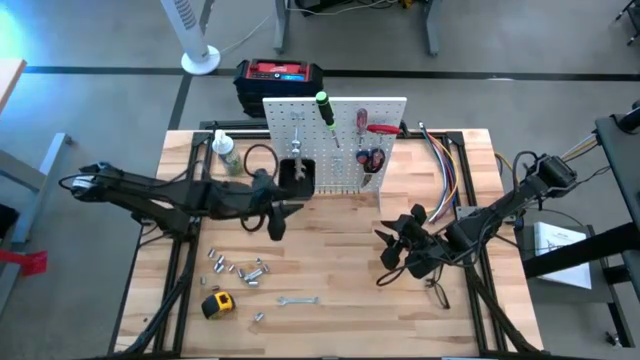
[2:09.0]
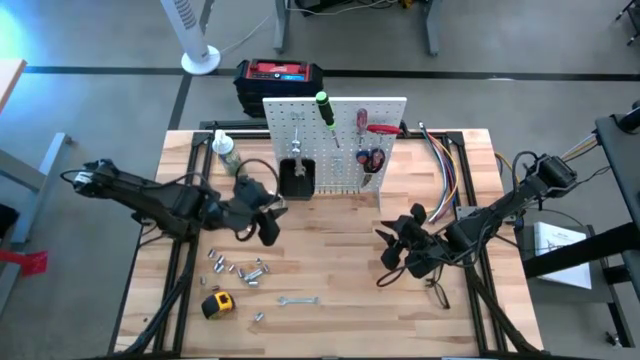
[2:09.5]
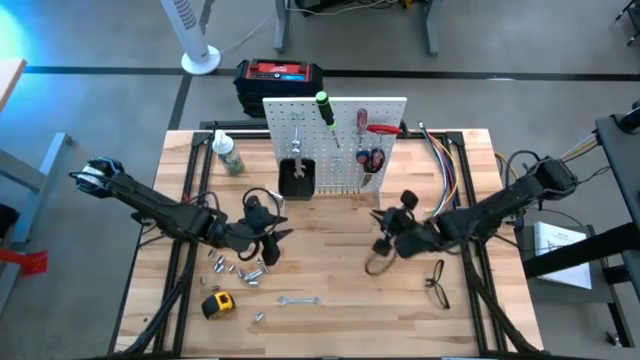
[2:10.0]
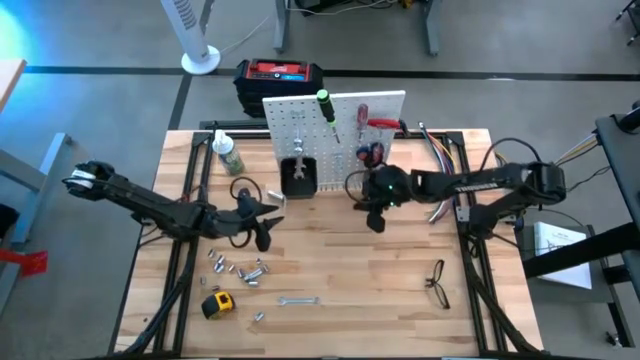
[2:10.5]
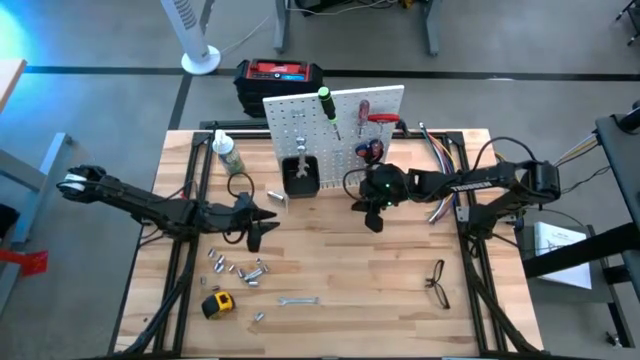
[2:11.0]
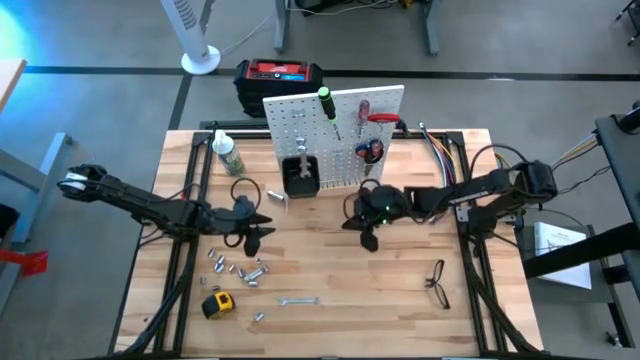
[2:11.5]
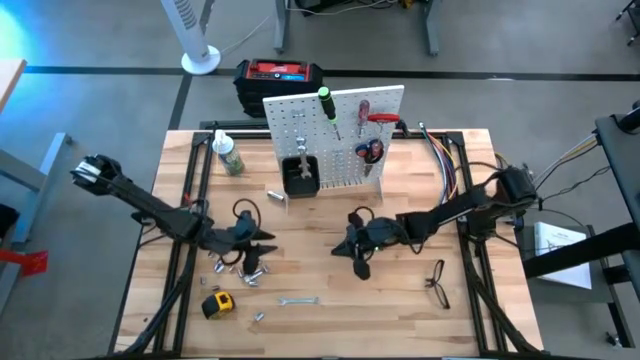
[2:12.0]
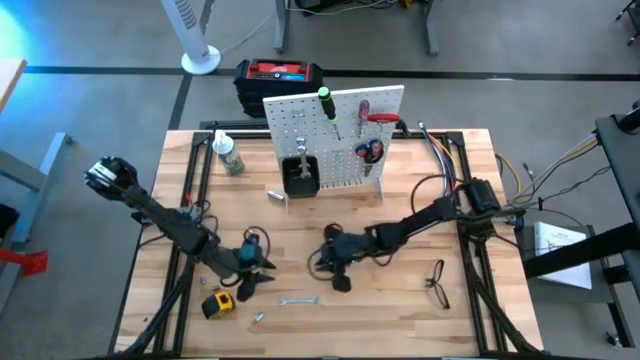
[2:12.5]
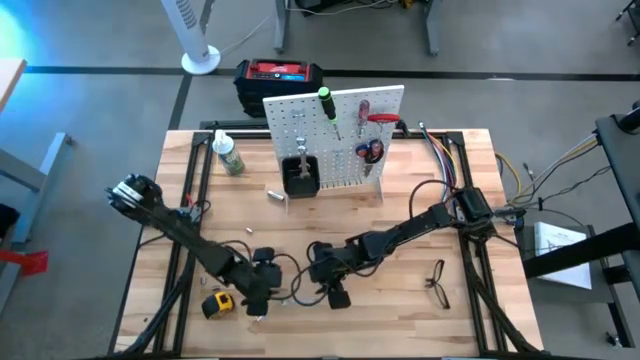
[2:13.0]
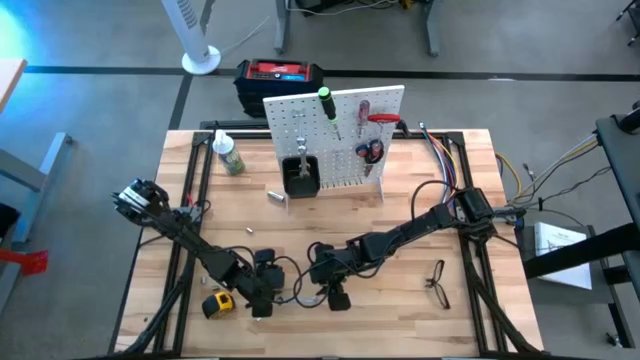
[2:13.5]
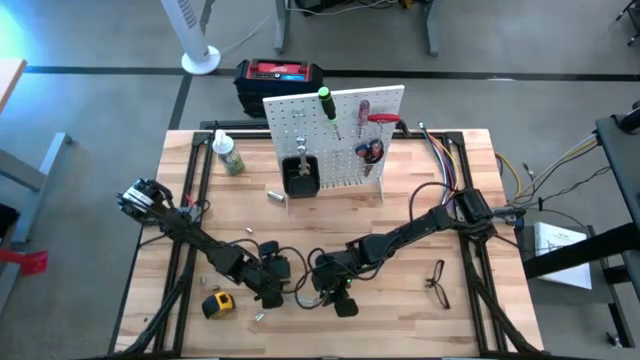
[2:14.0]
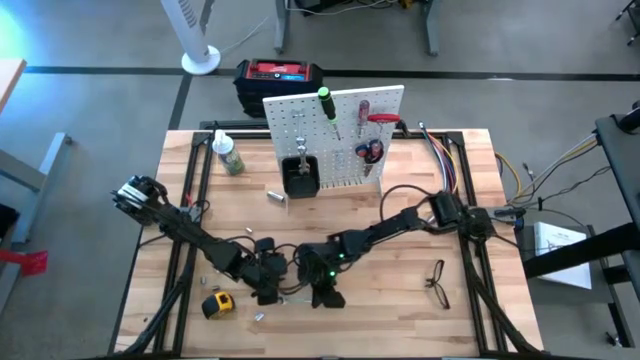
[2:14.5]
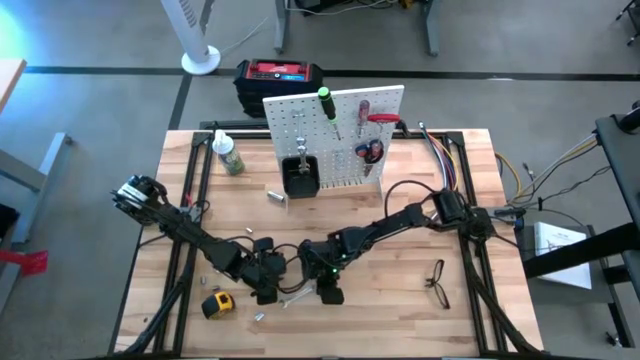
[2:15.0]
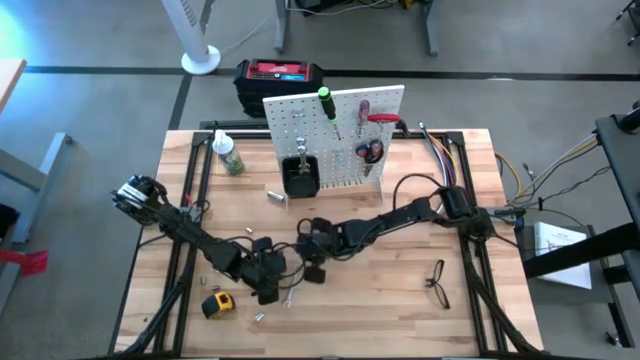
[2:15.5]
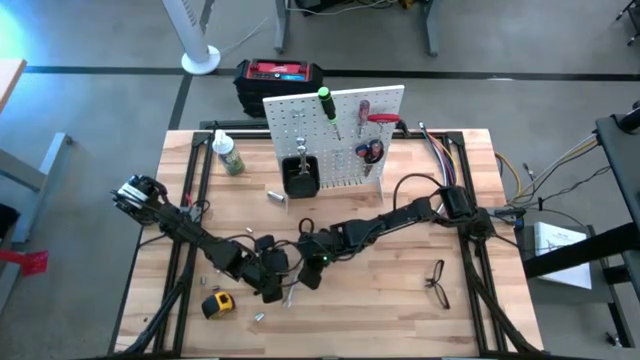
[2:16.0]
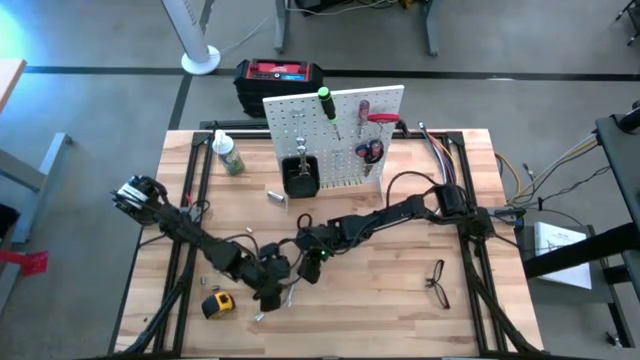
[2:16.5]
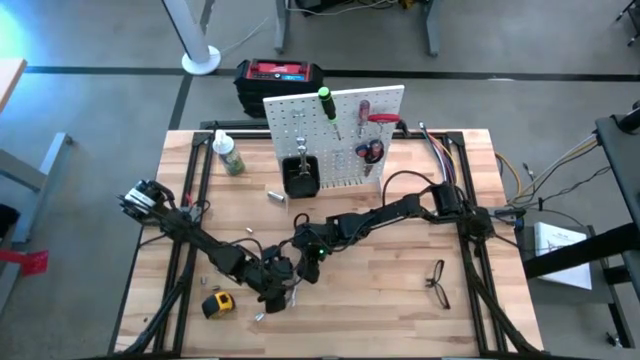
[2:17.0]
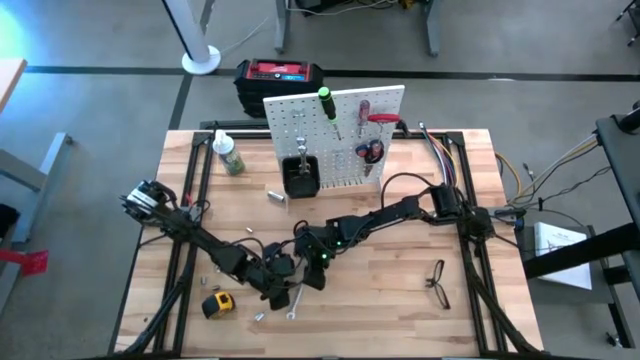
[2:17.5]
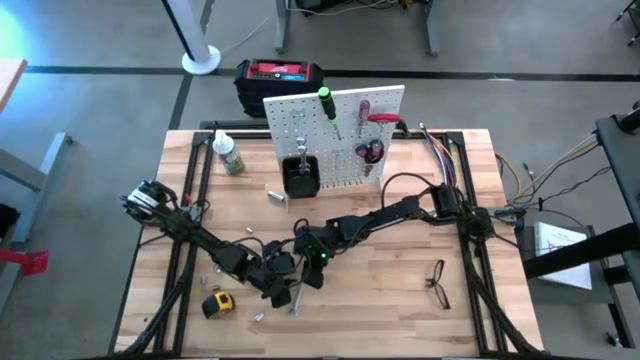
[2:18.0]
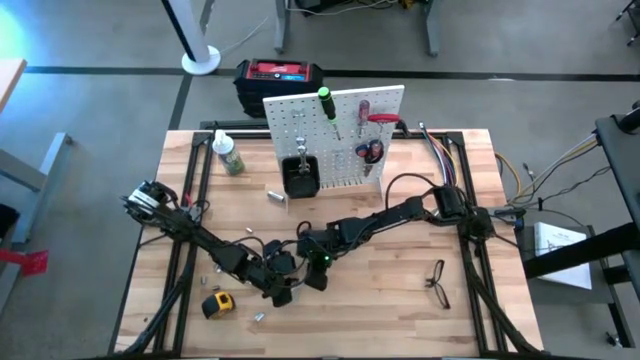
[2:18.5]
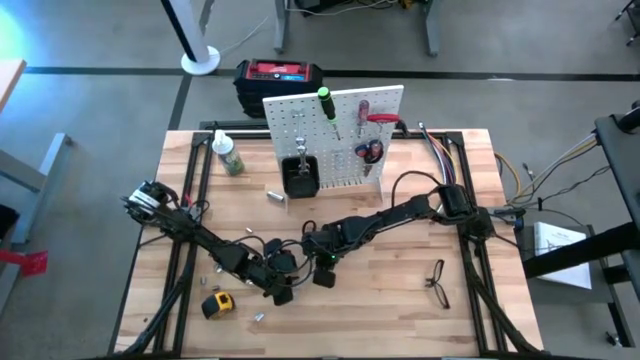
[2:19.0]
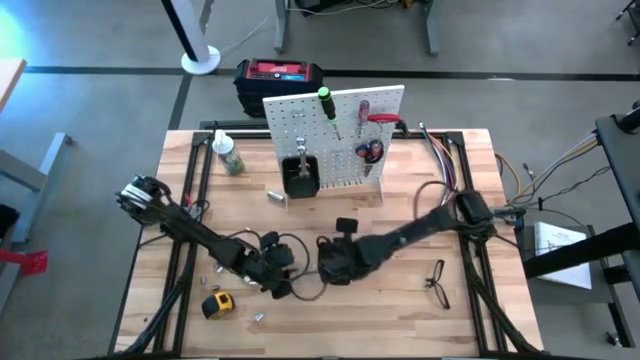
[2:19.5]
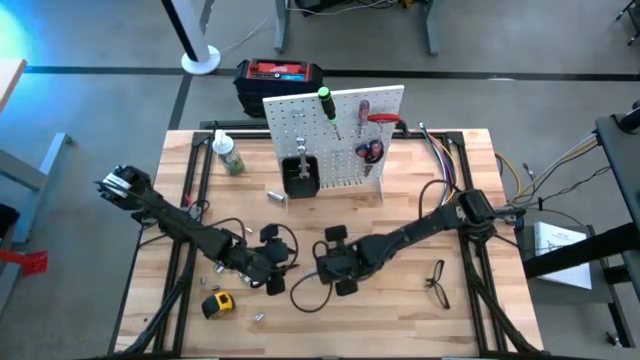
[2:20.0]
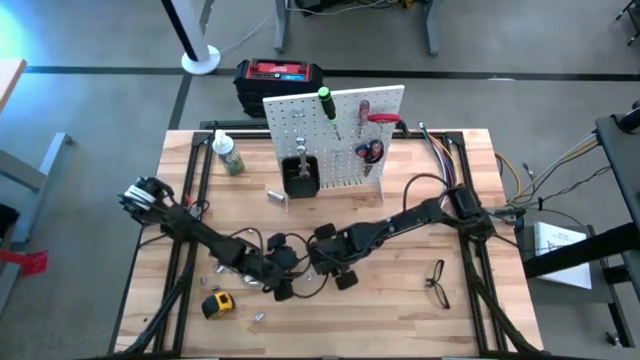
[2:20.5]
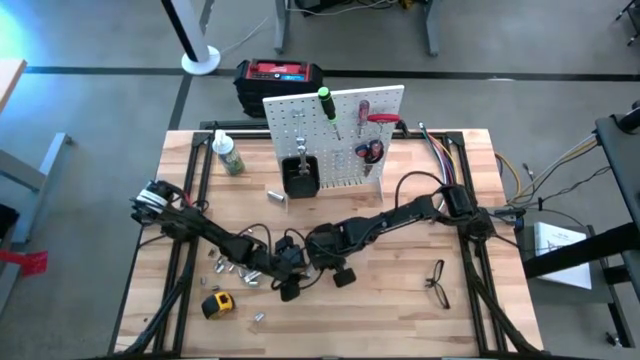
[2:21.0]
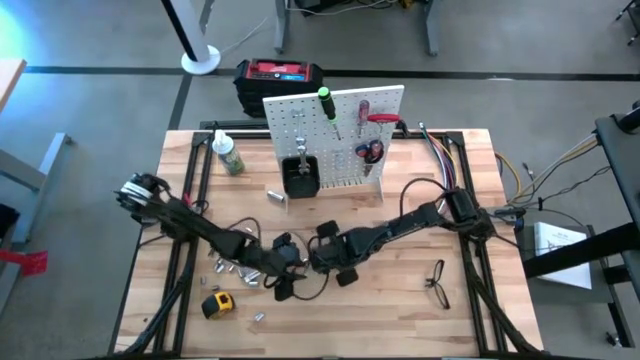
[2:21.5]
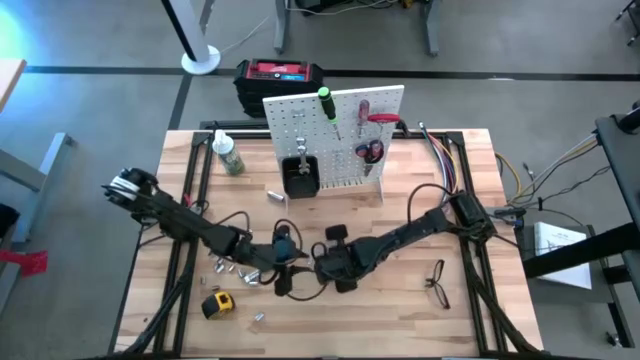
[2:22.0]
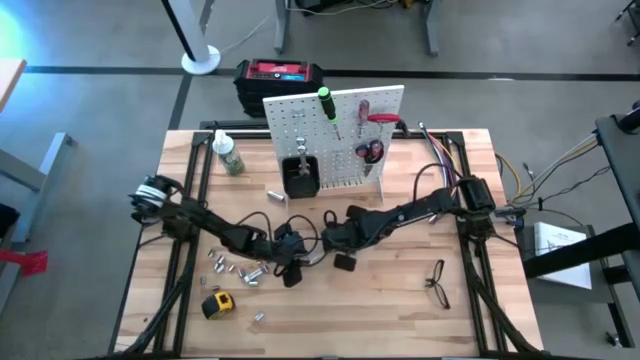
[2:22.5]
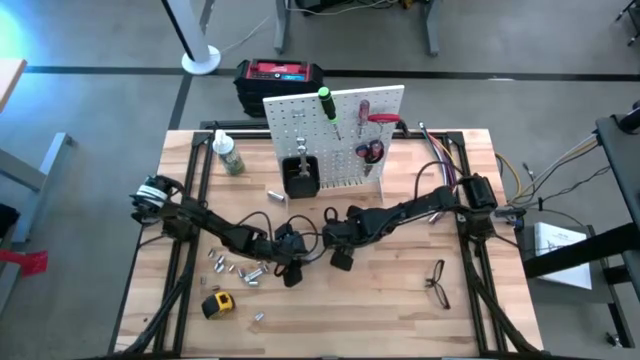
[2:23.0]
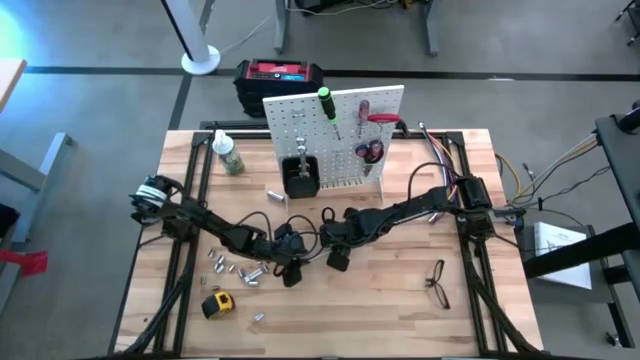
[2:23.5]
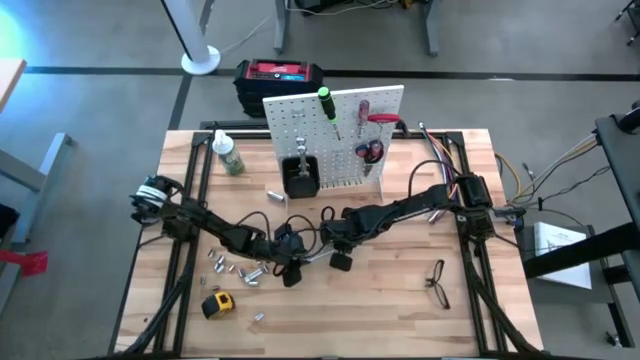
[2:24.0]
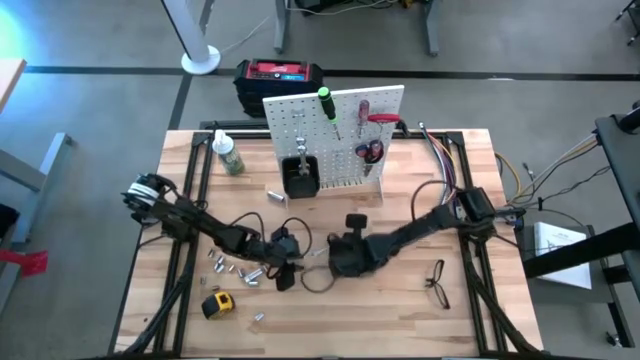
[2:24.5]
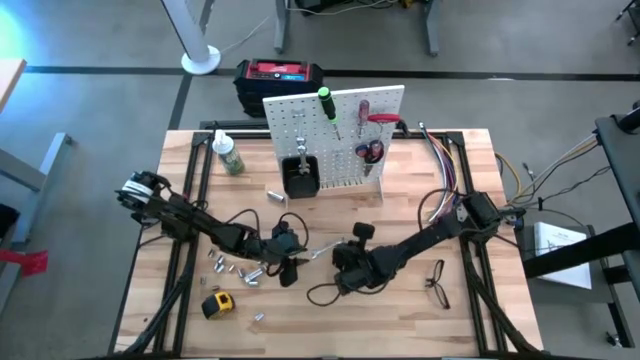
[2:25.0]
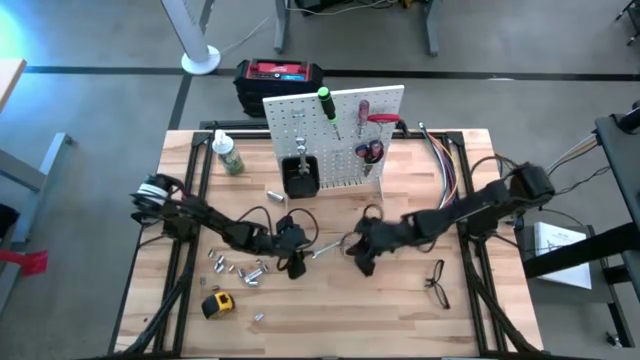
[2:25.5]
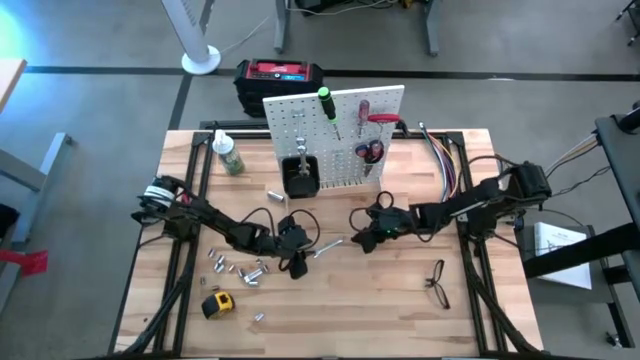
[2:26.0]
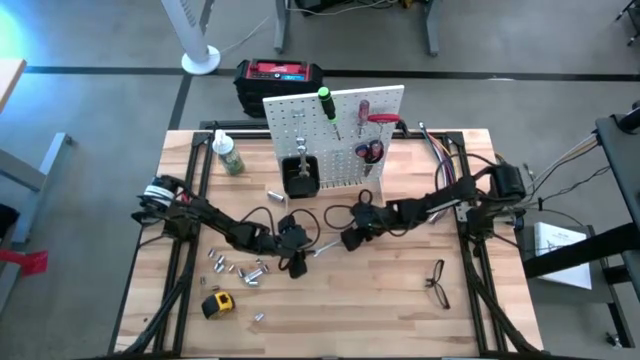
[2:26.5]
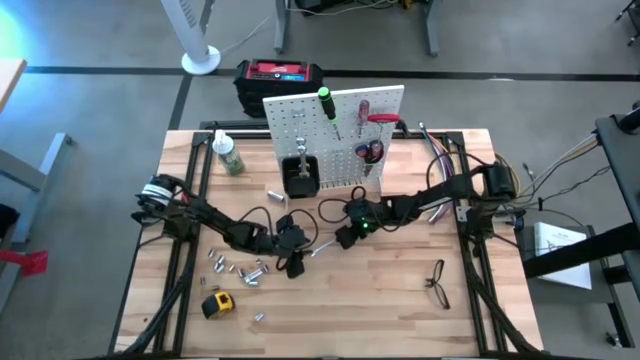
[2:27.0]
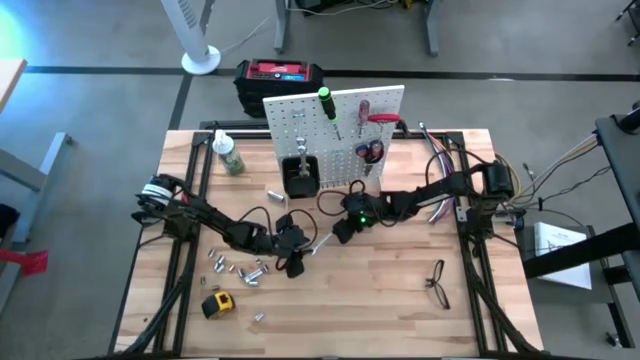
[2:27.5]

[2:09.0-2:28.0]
Task: Hang tools onto peg board
Hang the silver wrench on the pegboard

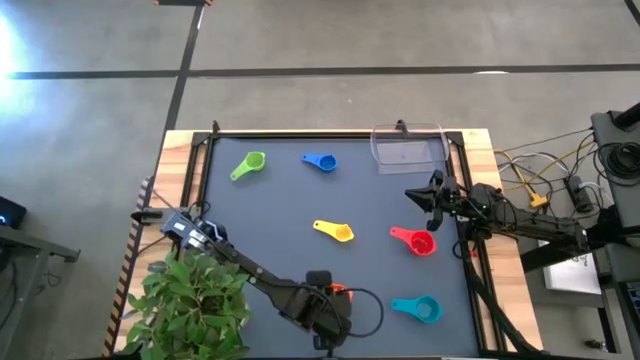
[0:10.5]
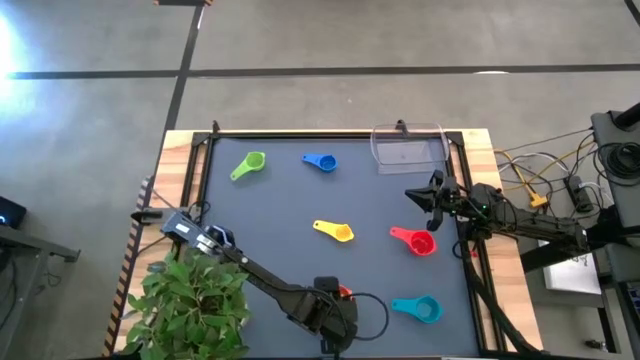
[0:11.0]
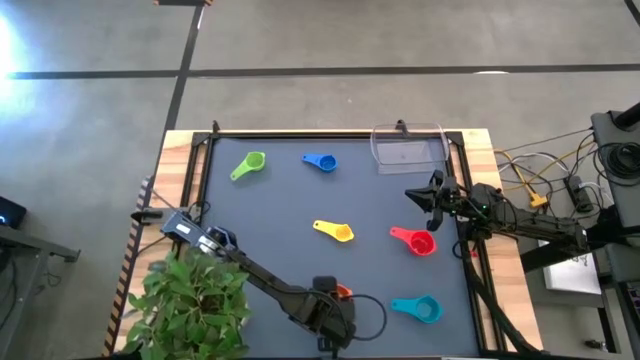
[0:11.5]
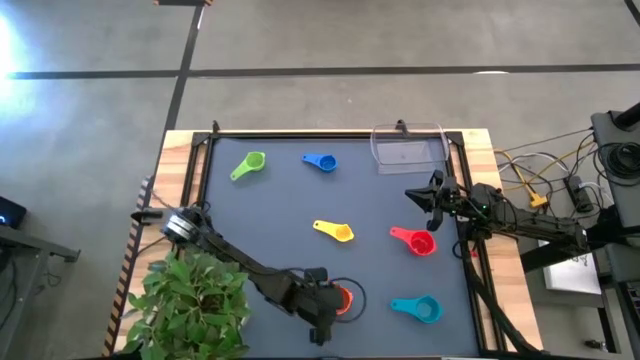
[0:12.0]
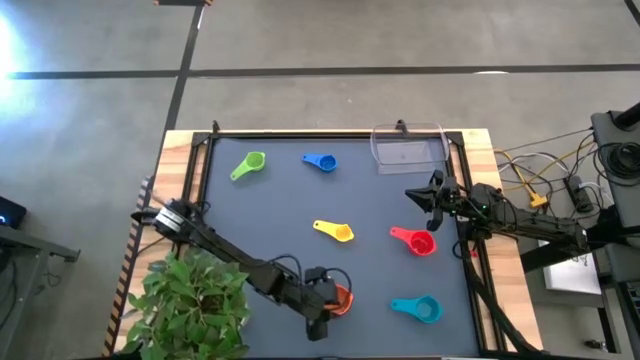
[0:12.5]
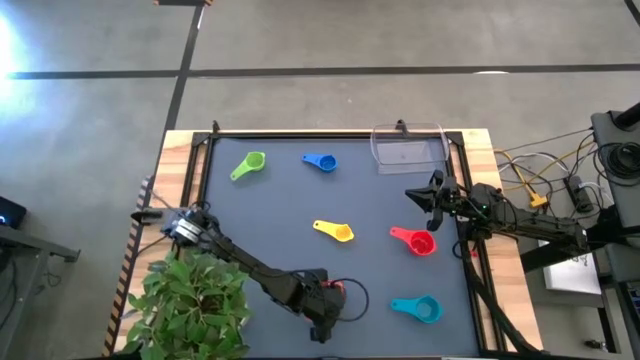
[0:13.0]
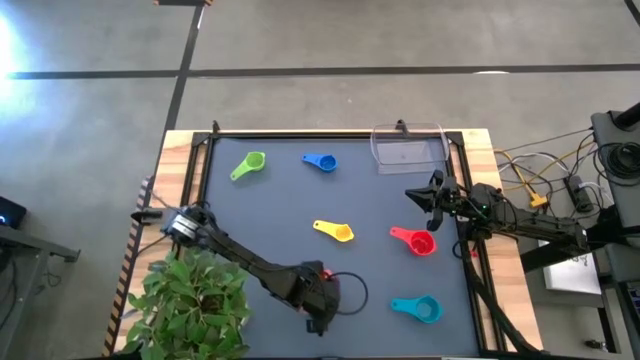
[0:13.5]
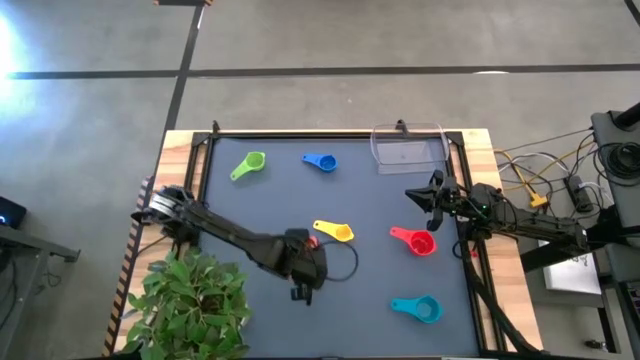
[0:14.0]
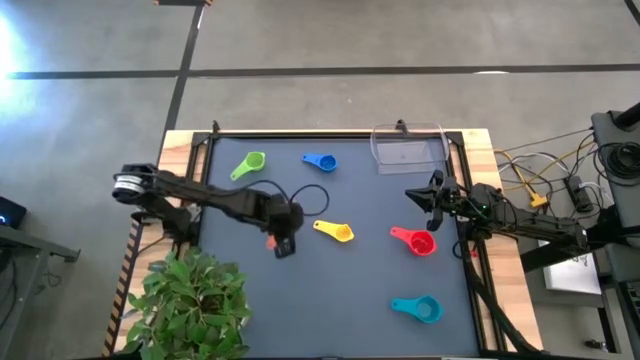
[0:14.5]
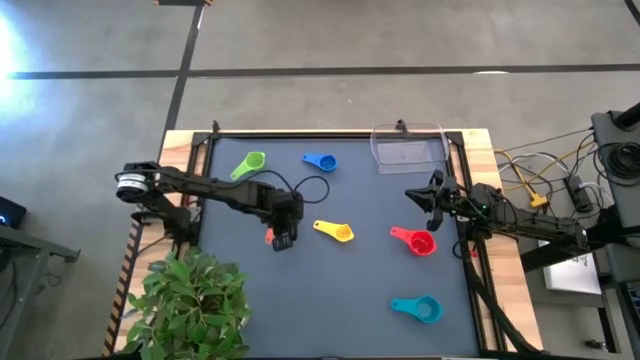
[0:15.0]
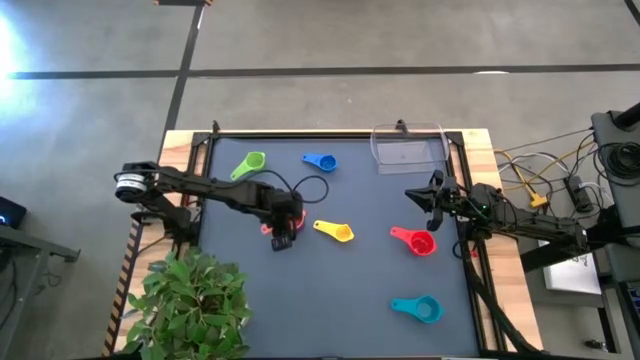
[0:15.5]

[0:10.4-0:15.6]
Task: Nest measuring cups in basket
Move the stacked measuring cups to the middle left of the table
